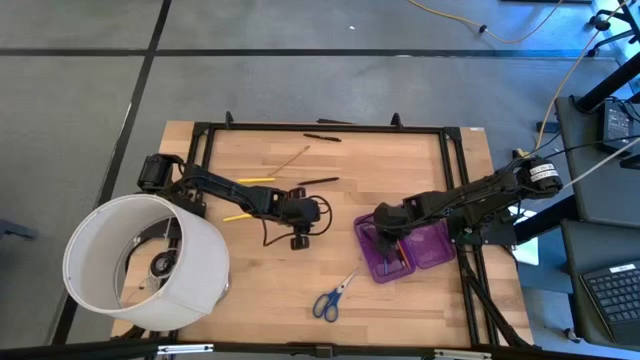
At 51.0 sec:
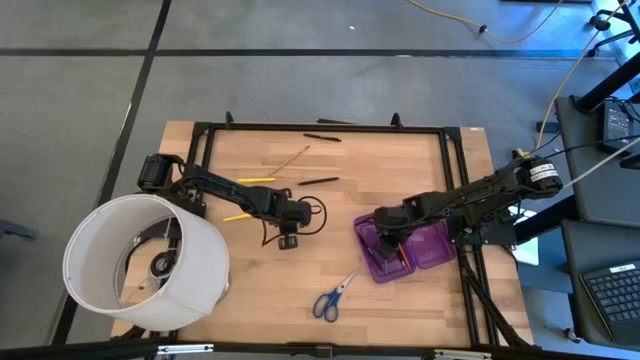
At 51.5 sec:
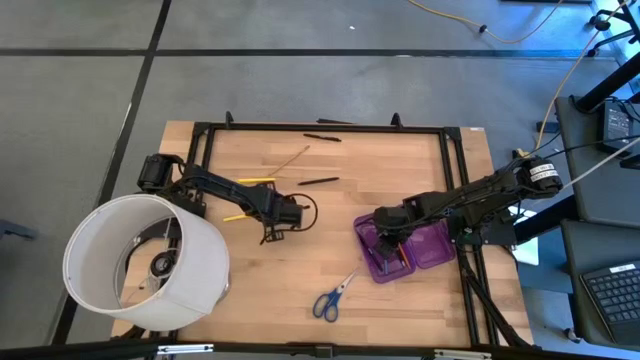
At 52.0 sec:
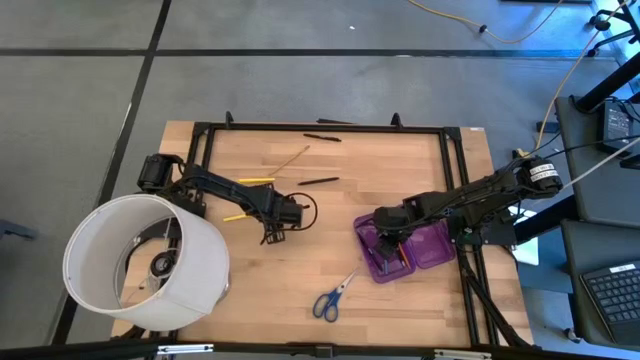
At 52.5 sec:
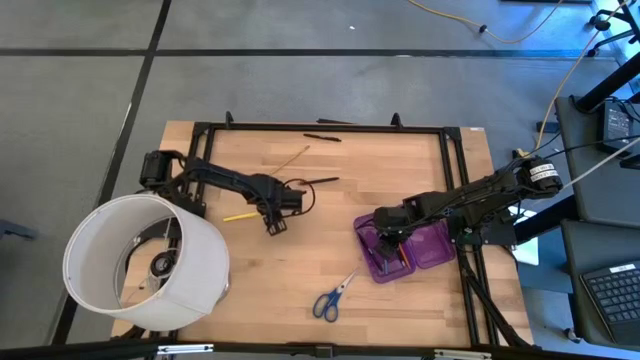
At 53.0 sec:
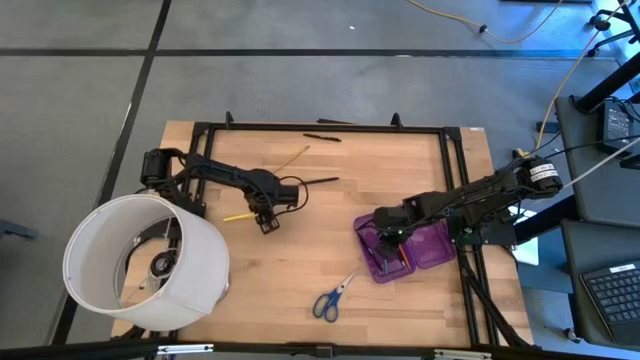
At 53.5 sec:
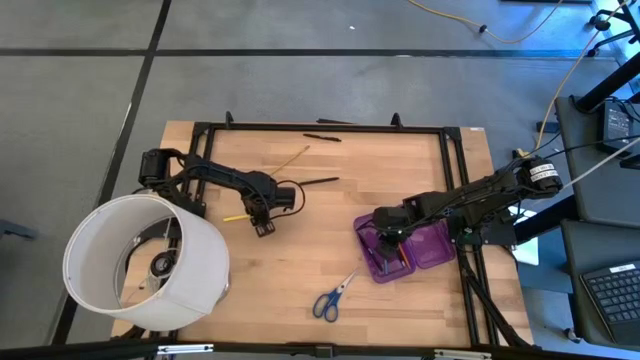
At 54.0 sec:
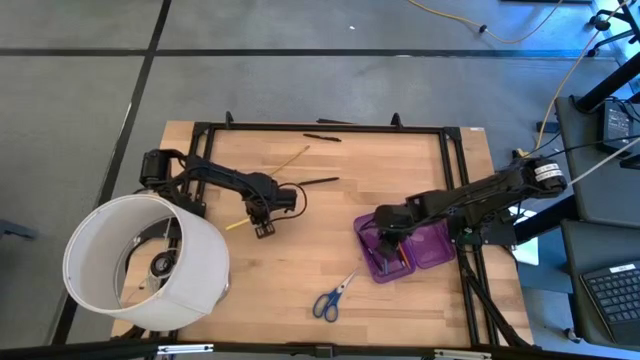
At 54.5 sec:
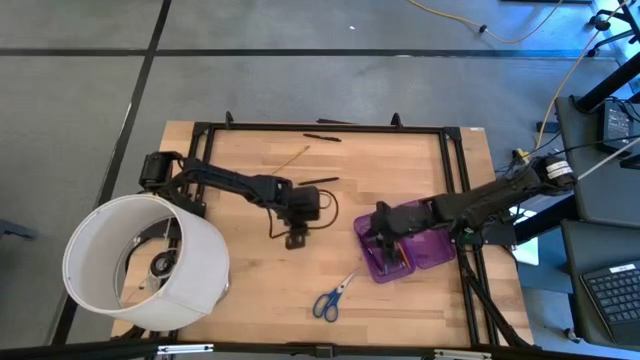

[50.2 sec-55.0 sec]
Task: Pick & place school supplies into a supply box
Put the bottom yellow pen into the supply box

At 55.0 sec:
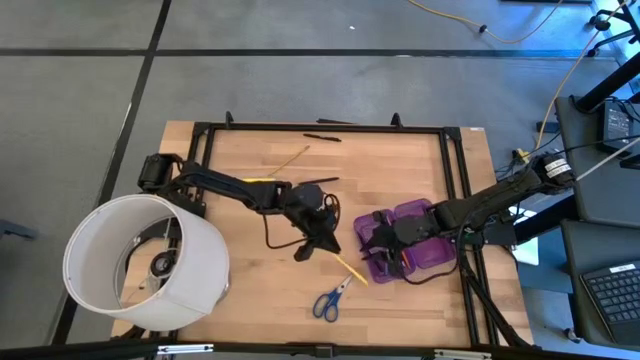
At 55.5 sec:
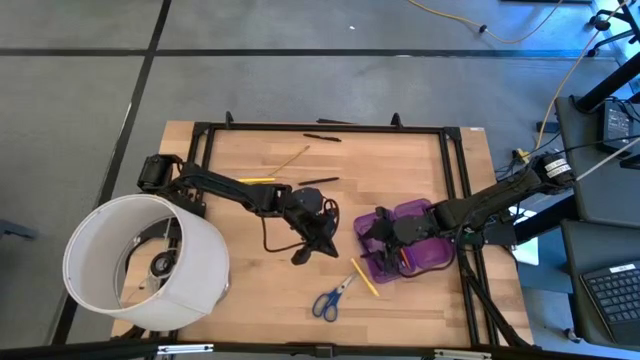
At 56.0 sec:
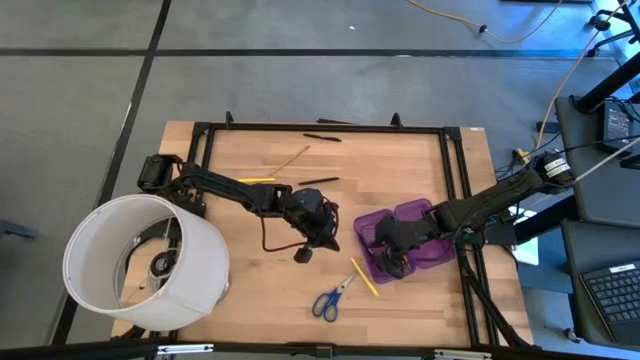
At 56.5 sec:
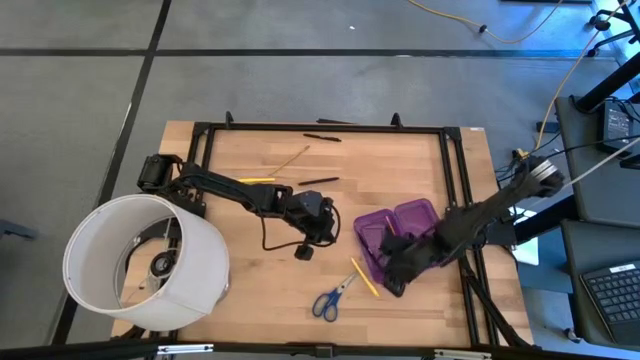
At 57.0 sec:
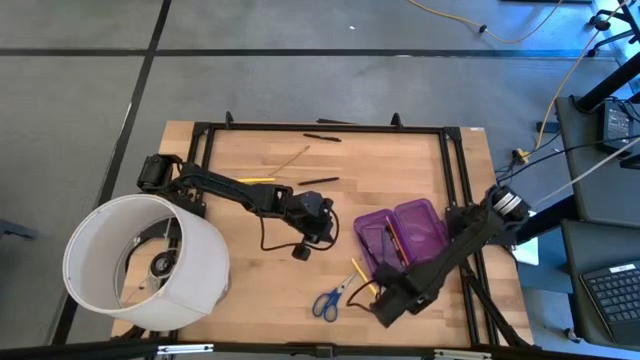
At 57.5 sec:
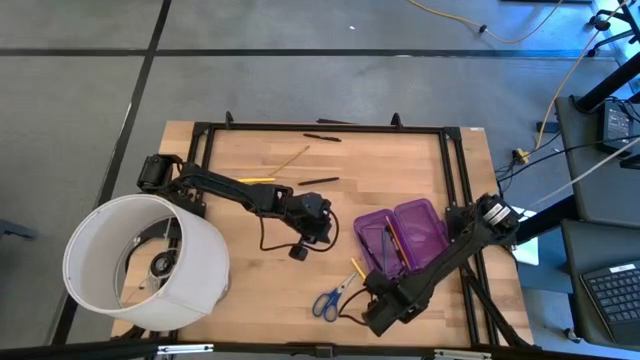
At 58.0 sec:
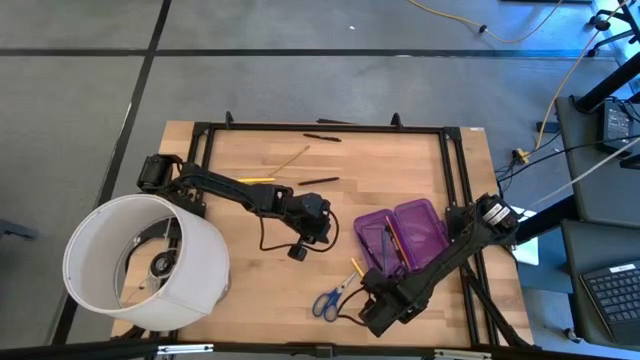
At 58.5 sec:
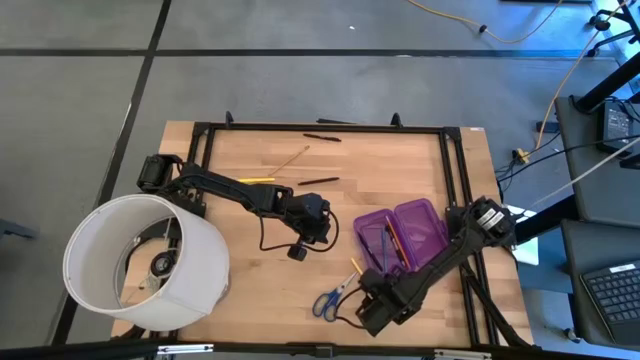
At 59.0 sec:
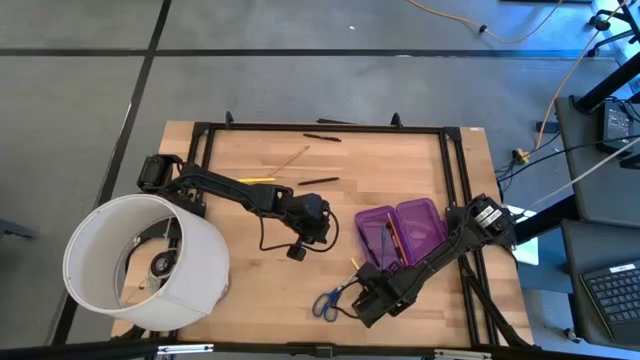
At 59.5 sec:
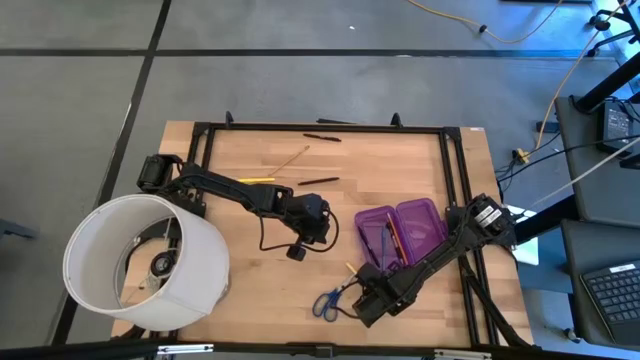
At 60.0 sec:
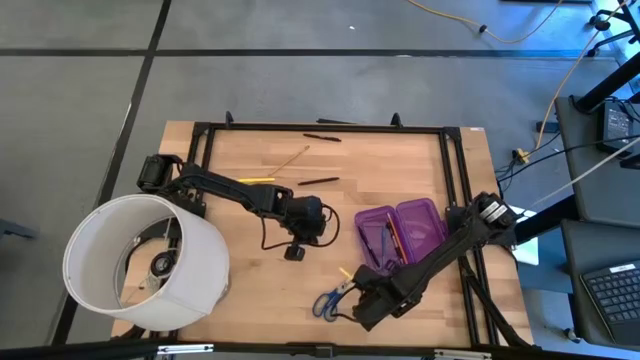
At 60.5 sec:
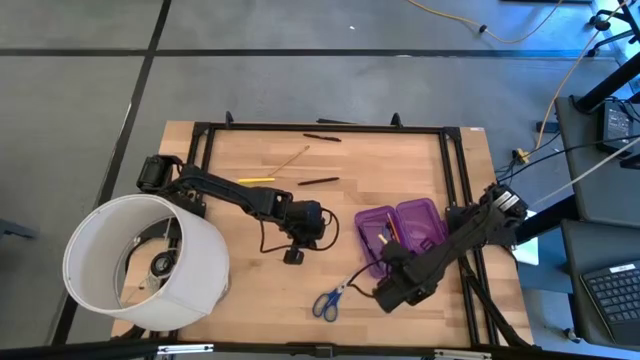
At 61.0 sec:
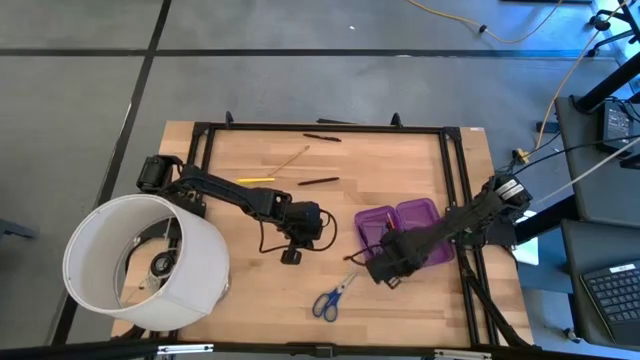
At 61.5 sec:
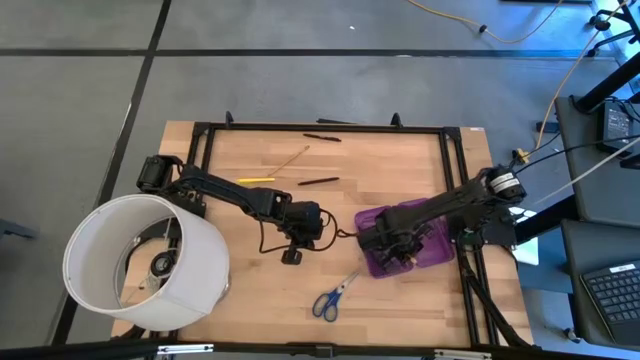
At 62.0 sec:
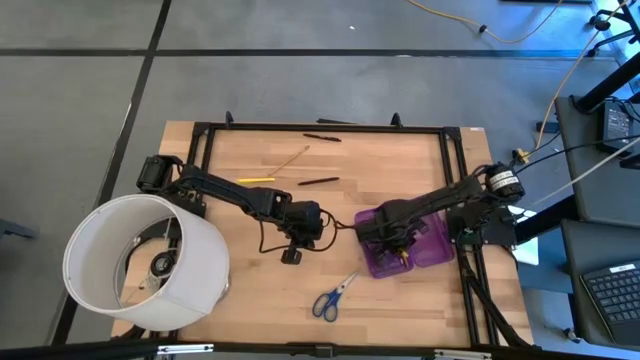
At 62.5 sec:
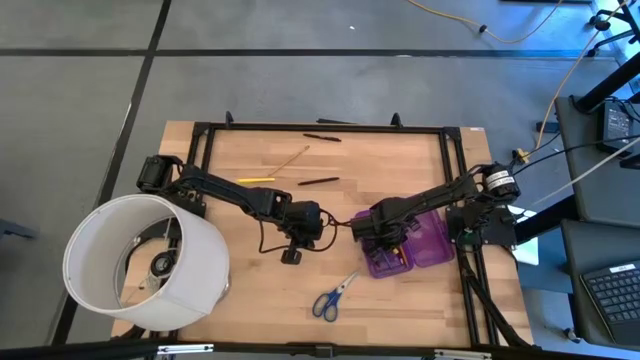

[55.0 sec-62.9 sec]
Put the bottom yellow pen into the supply box

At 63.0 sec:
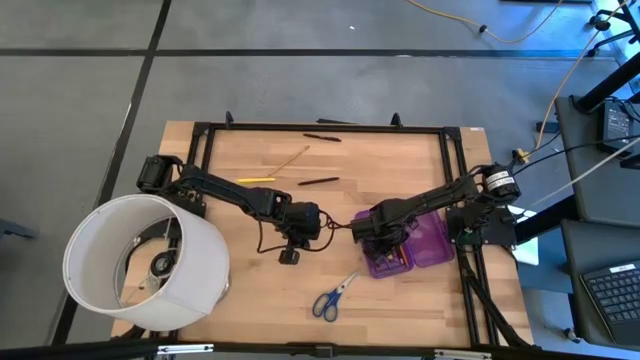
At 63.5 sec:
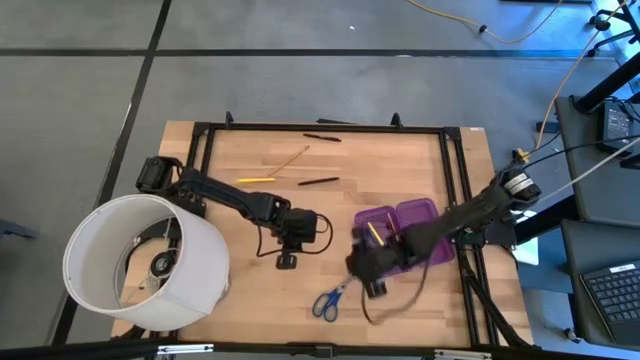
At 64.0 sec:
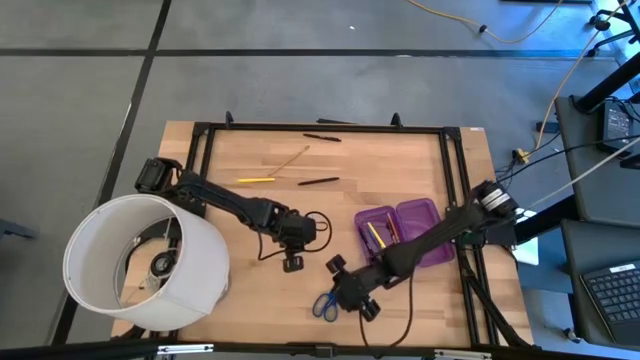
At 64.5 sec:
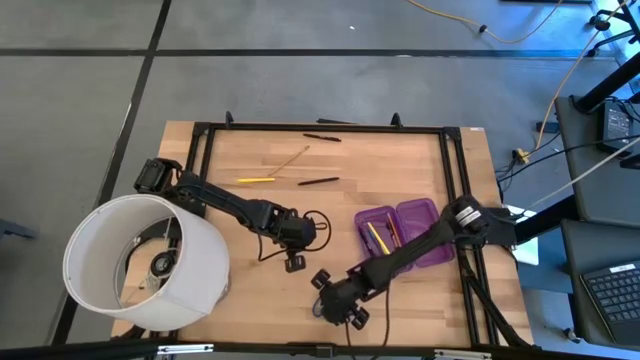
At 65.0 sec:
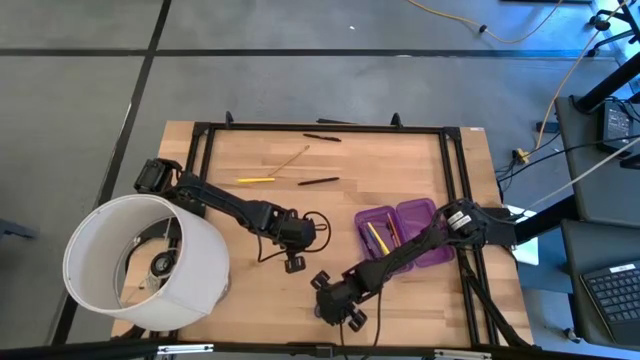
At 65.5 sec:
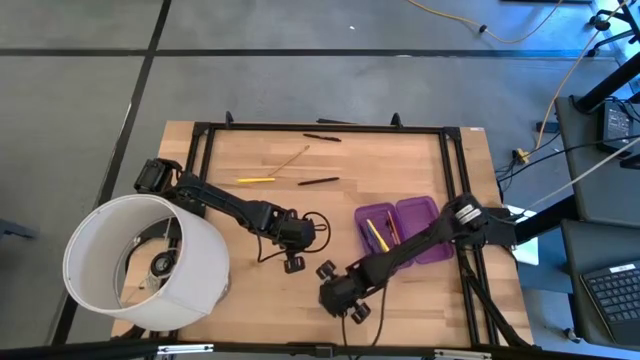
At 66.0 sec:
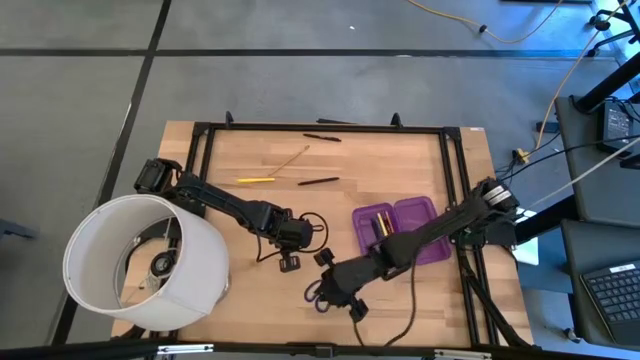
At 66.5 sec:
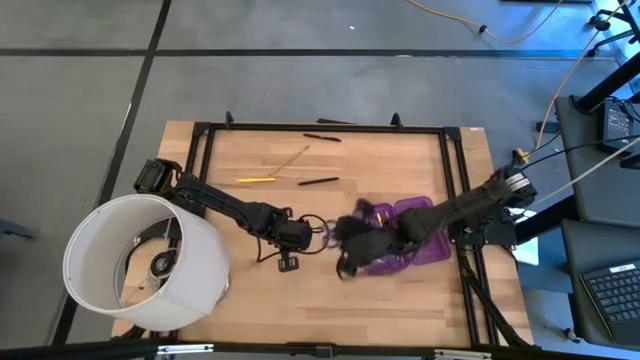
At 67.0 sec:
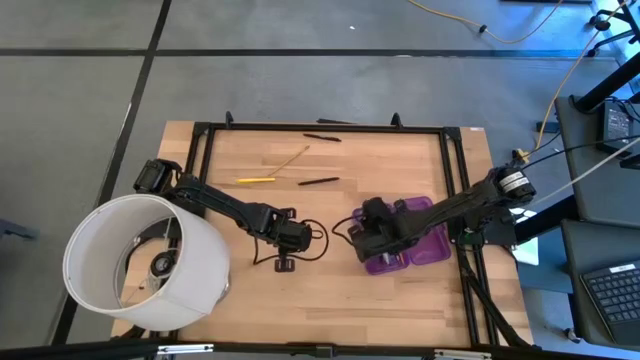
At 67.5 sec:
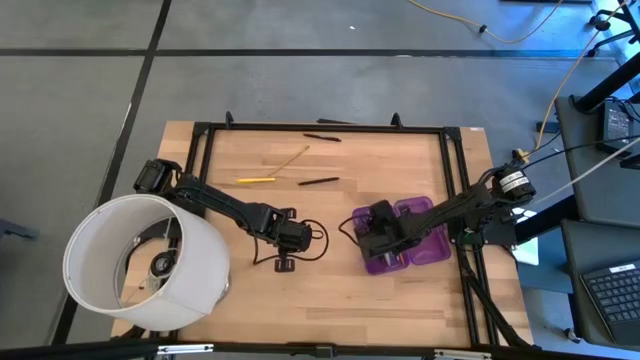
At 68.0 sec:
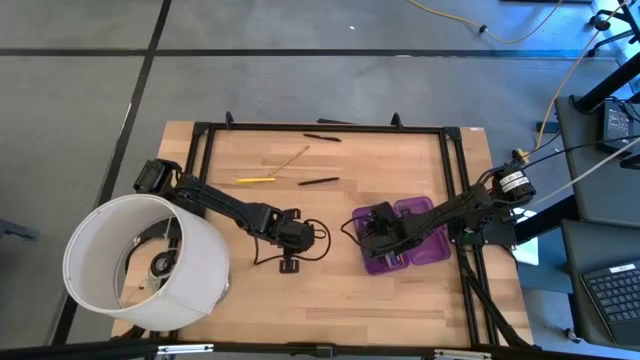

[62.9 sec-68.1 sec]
Put the scissors into the supply box

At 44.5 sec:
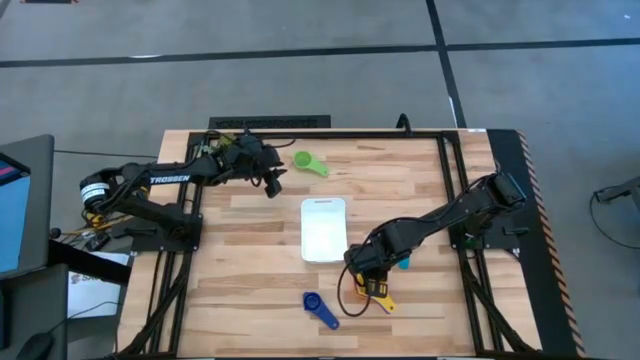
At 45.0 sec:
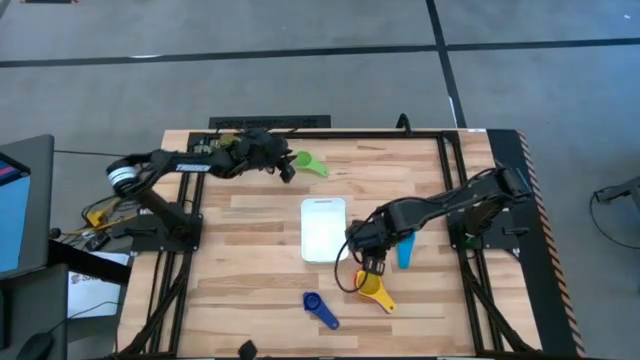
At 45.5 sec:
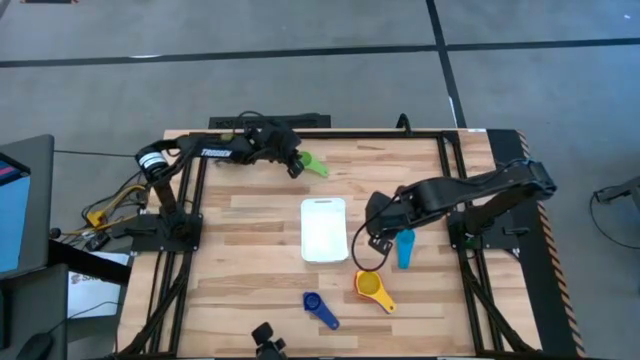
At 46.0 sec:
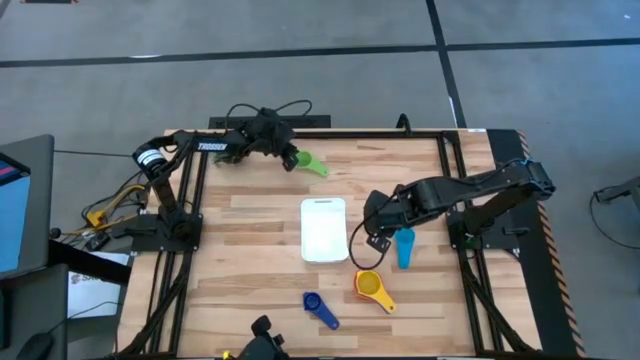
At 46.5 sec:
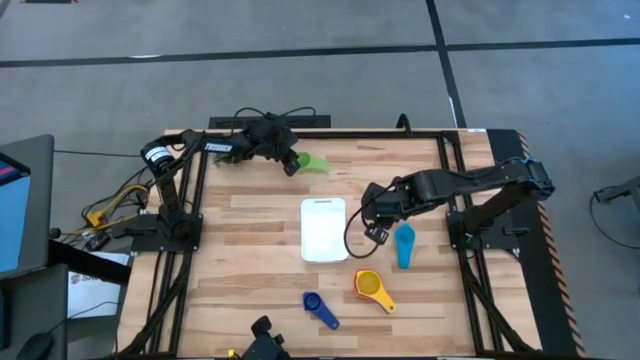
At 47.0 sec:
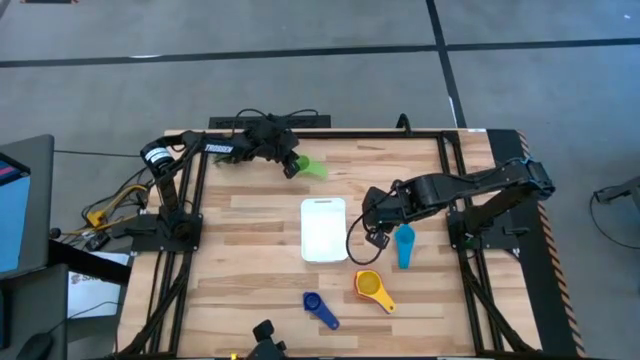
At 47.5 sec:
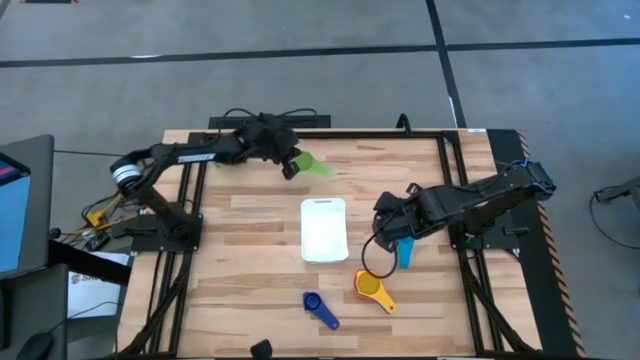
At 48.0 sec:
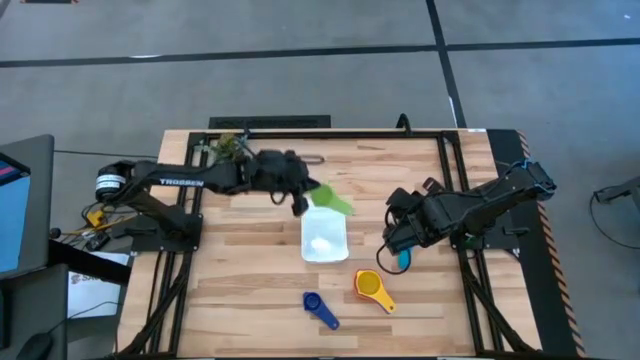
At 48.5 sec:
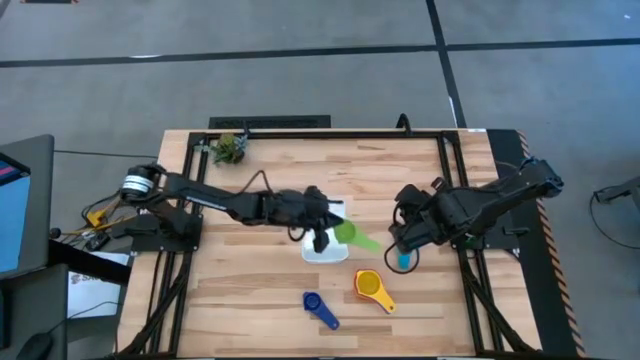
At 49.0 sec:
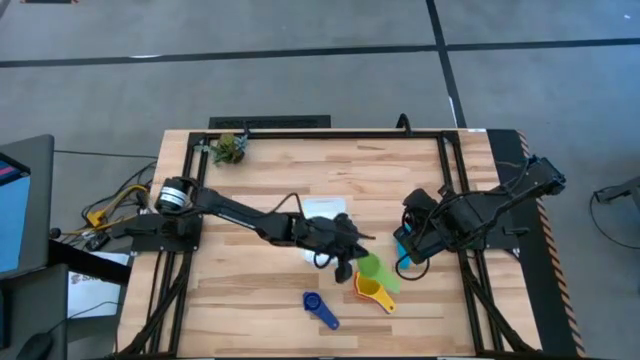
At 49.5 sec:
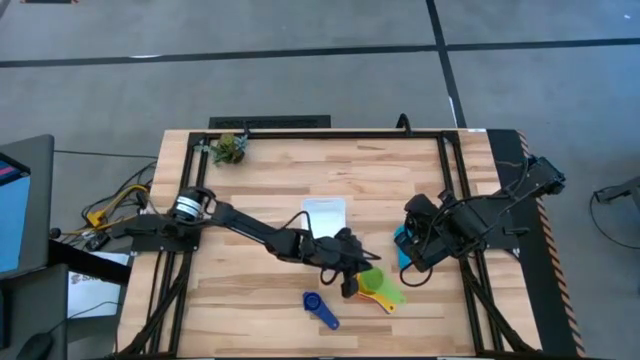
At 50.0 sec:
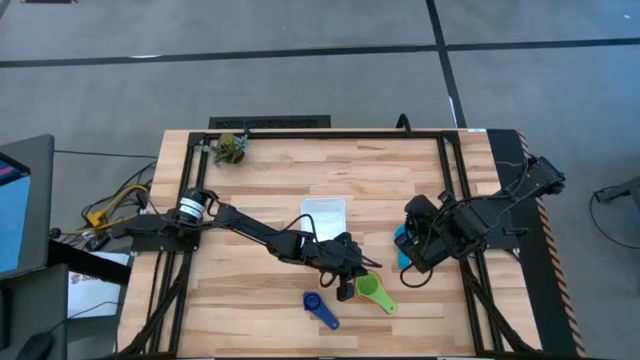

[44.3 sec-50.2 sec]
Task: Nest measuring cups in basket
Stack the green measuring cup on top of the yellow measuring cup
